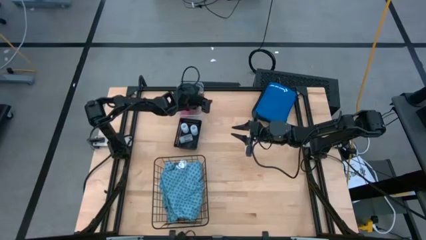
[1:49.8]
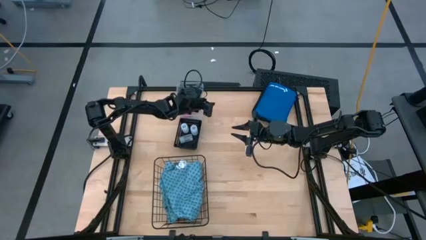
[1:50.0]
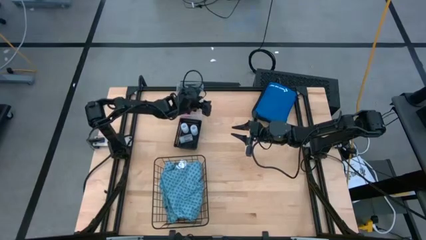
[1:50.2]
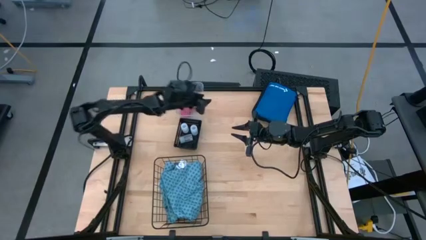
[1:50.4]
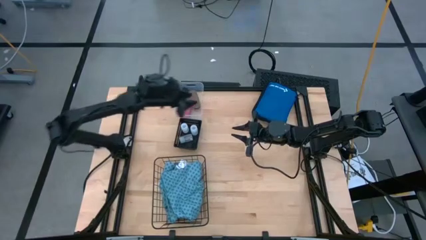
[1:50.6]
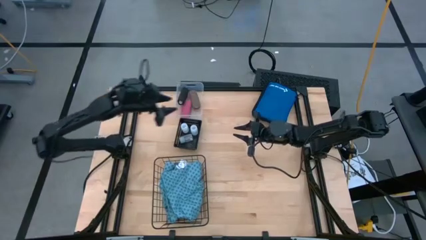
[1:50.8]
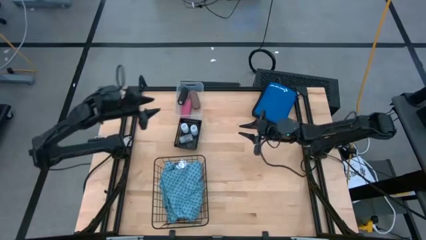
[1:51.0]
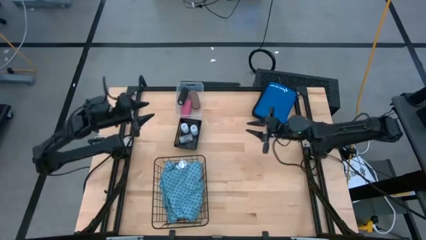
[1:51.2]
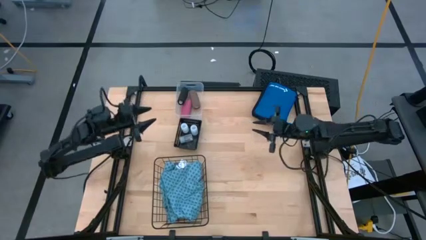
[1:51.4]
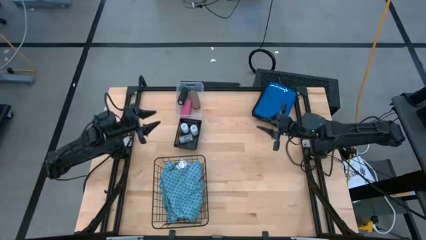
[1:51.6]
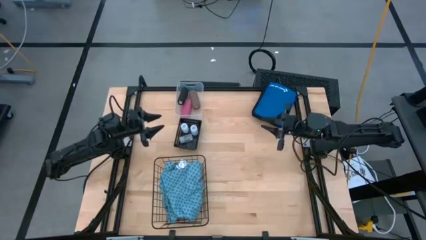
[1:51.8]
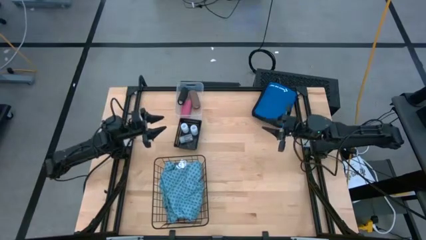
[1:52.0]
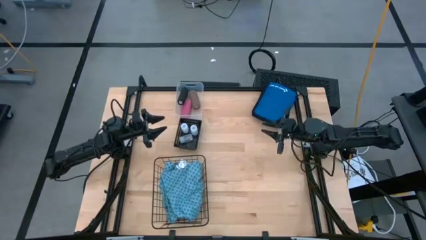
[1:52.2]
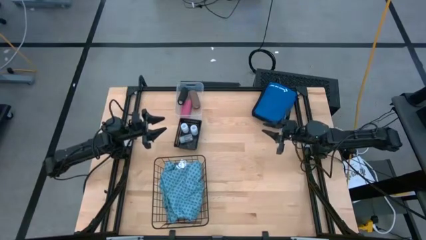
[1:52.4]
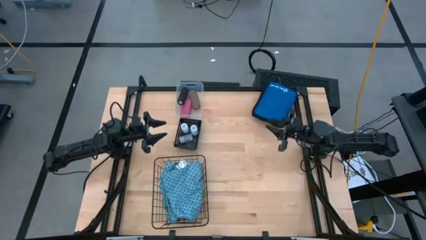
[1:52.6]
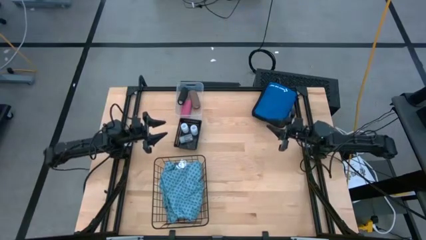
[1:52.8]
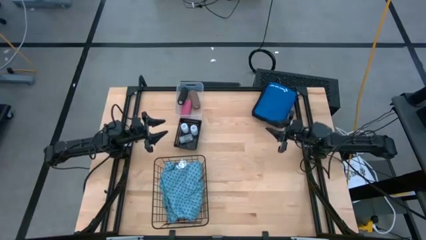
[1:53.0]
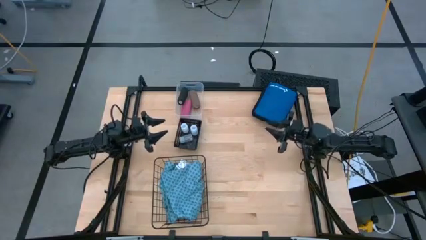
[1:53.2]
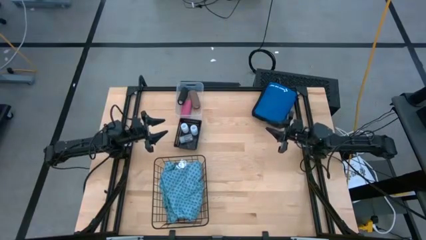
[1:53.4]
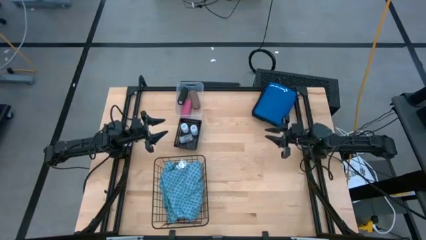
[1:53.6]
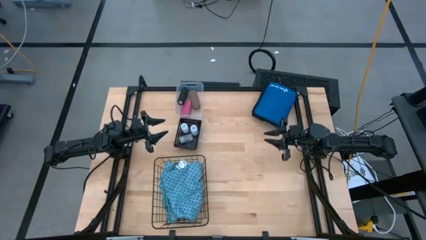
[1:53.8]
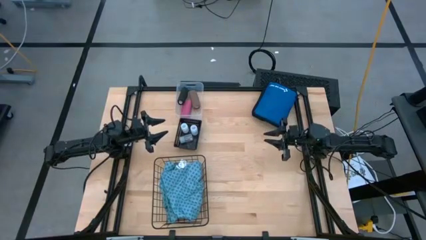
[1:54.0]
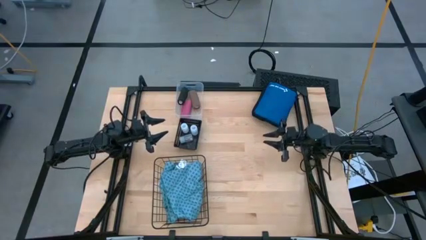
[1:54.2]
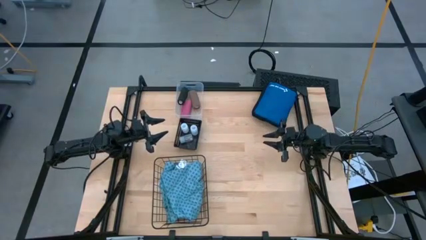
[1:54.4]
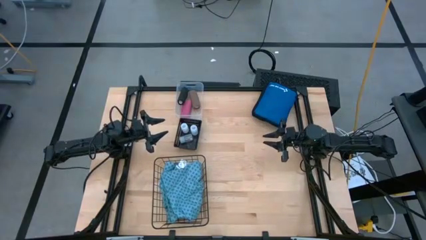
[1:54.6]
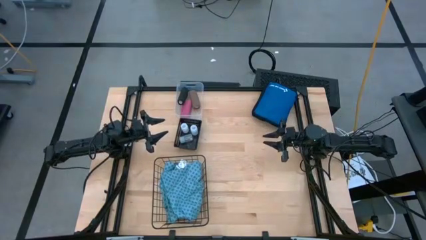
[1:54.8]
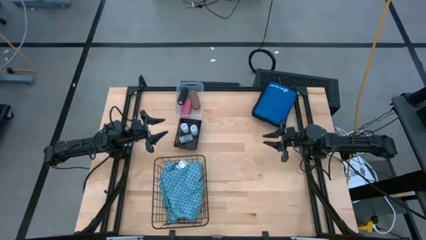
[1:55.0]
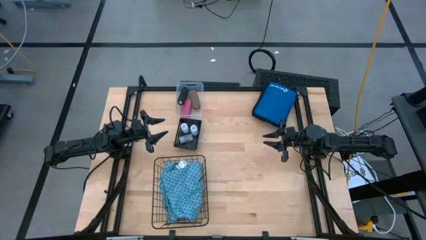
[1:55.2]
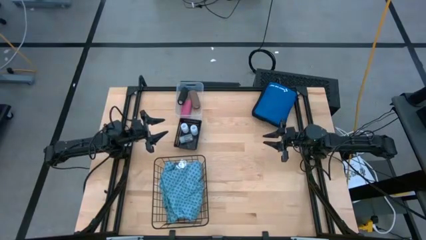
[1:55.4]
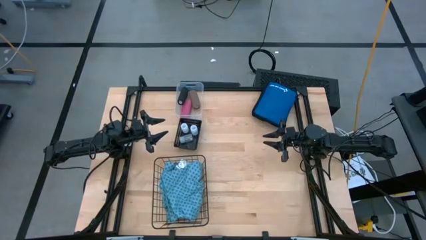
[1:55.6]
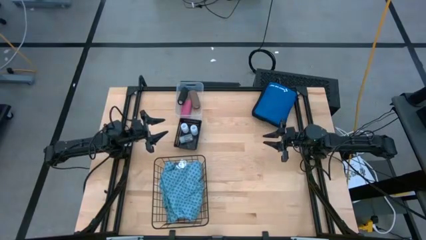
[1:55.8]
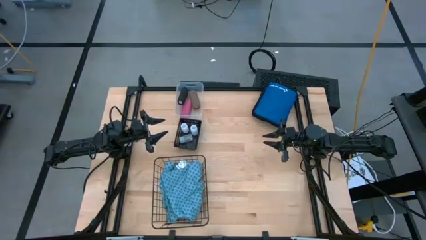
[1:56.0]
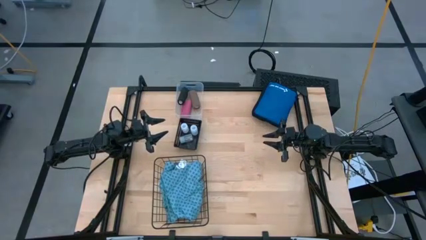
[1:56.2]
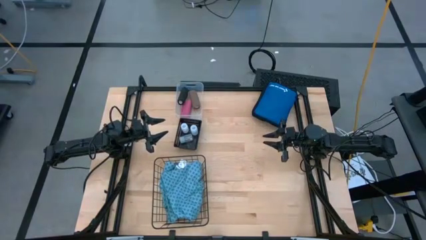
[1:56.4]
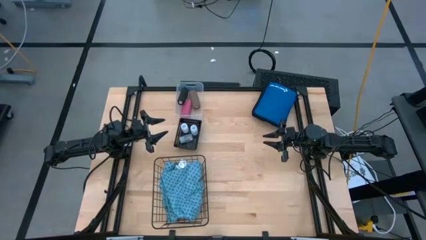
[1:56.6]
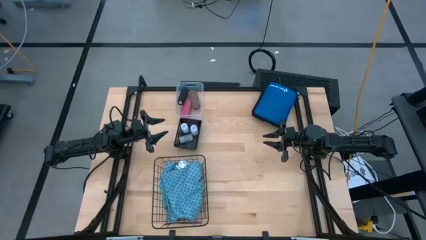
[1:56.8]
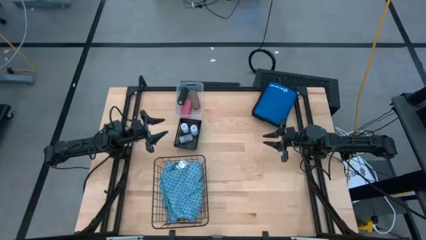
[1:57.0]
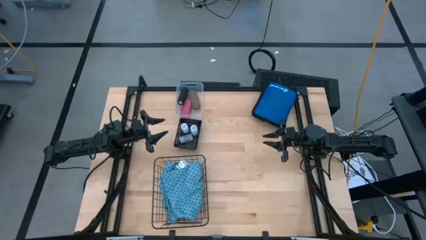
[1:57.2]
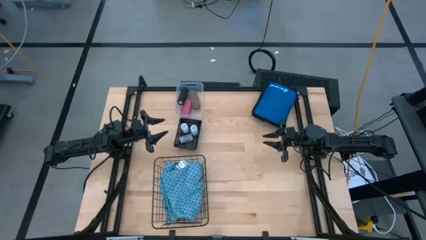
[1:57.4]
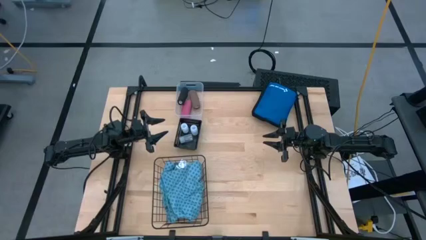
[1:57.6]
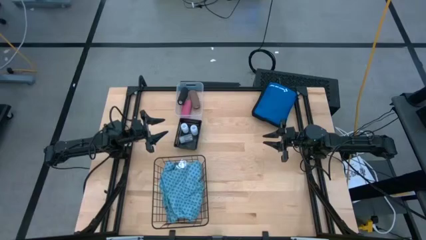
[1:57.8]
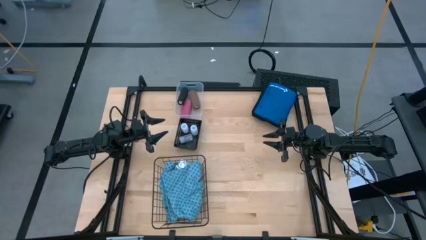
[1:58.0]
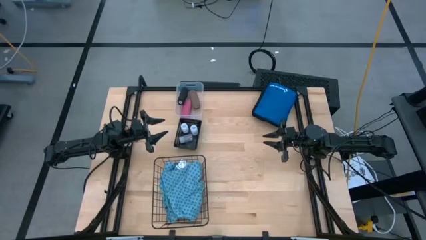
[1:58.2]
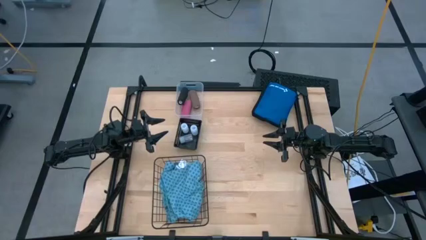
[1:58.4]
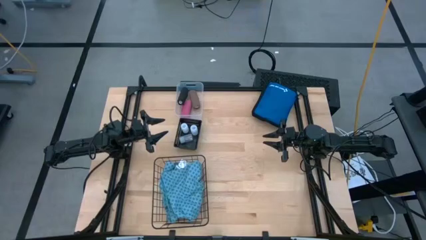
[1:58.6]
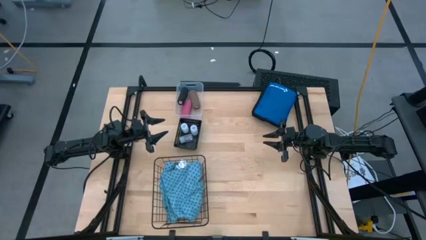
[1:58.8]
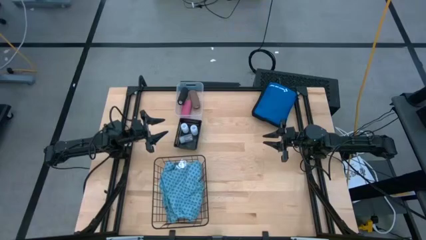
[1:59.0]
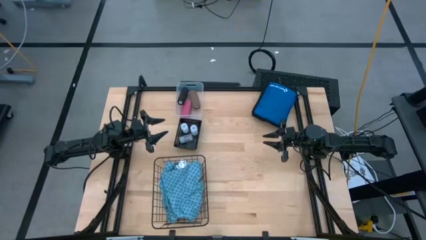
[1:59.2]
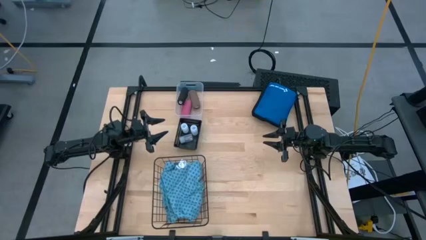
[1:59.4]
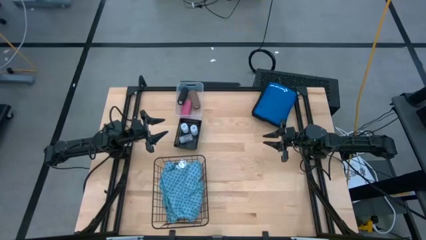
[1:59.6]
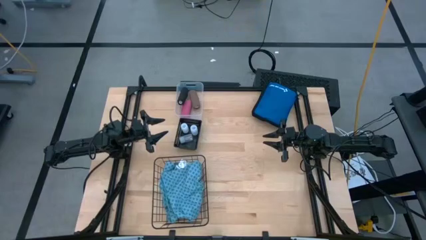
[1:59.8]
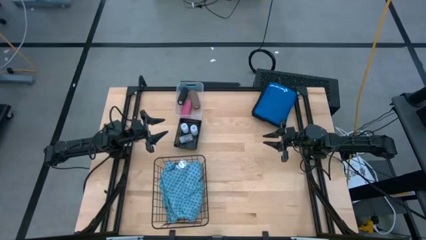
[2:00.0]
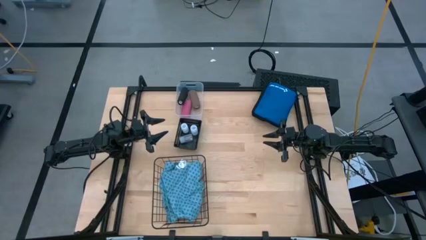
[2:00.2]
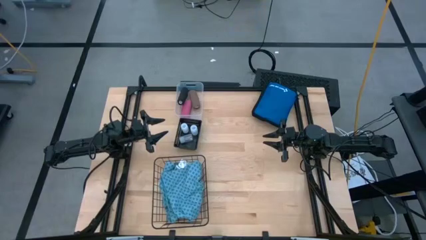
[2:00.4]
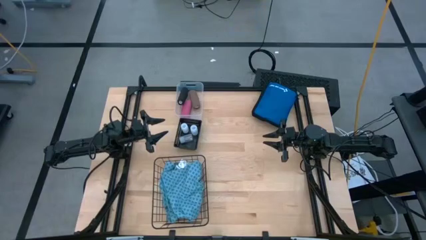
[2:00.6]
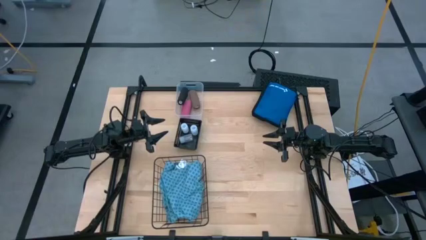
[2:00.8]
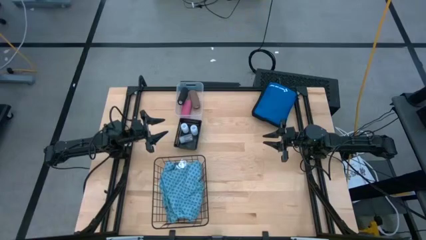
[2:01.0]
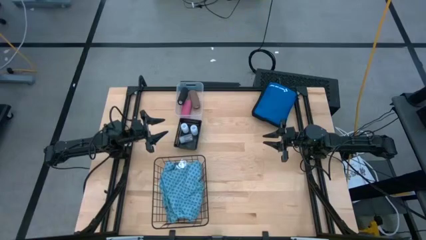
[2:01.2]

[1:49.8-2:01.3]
Task: Pick & place medical supplies in basket/bin
Return to Home Position
